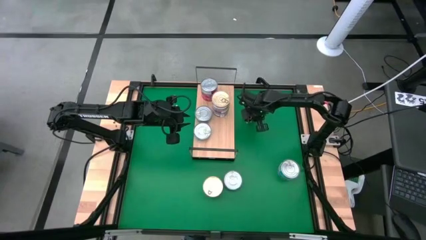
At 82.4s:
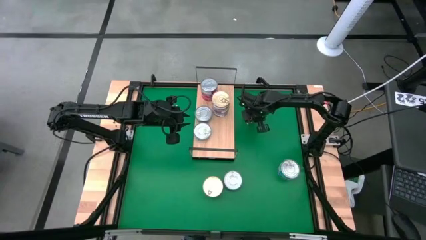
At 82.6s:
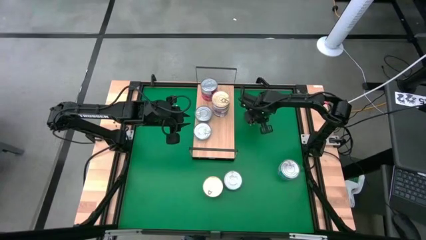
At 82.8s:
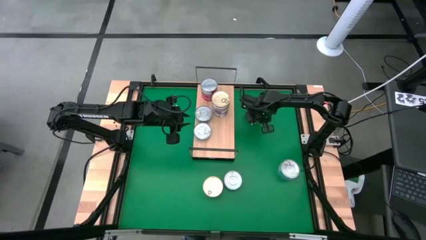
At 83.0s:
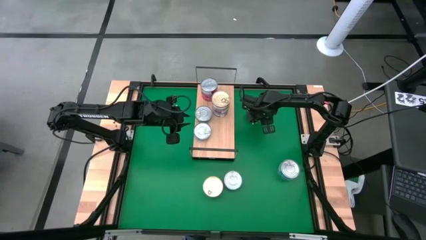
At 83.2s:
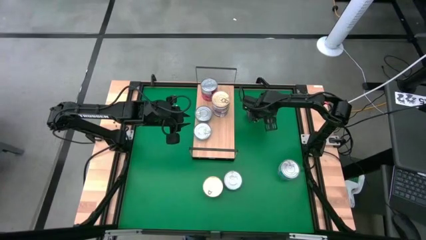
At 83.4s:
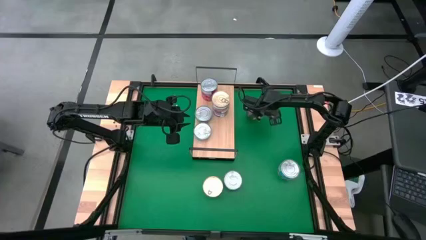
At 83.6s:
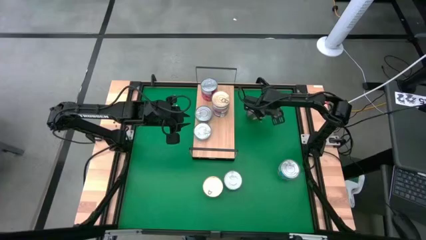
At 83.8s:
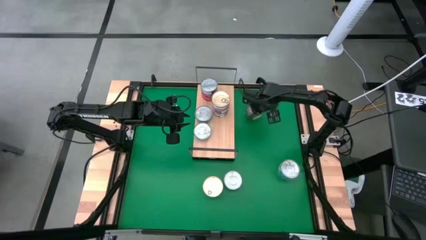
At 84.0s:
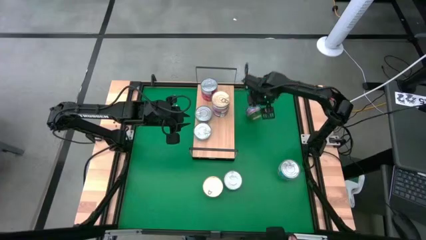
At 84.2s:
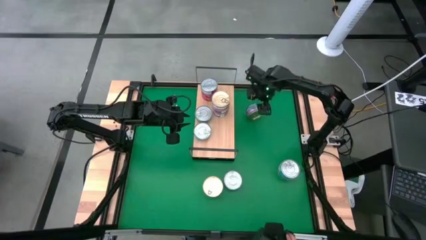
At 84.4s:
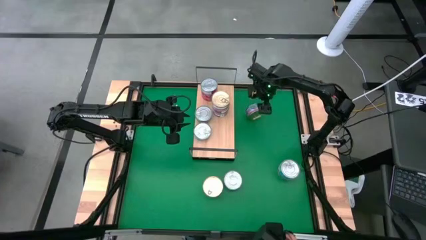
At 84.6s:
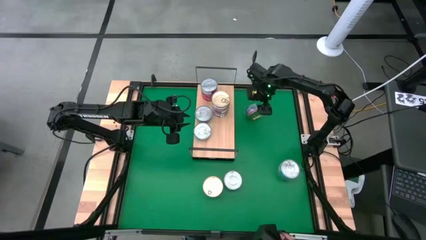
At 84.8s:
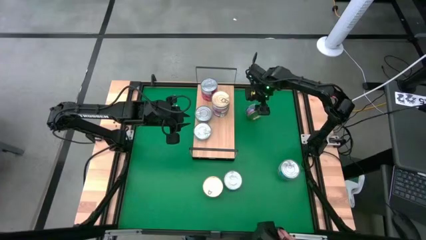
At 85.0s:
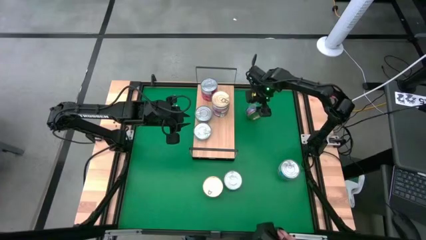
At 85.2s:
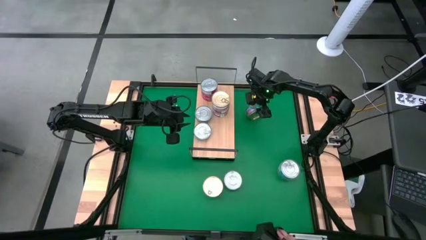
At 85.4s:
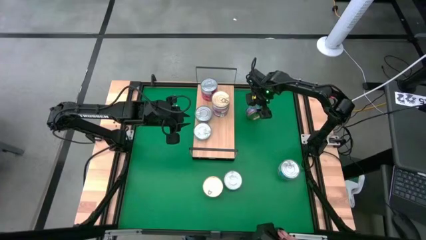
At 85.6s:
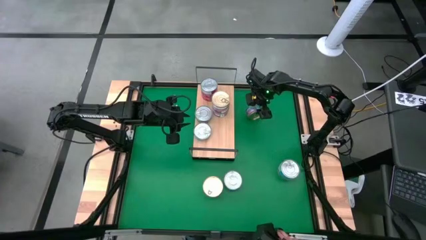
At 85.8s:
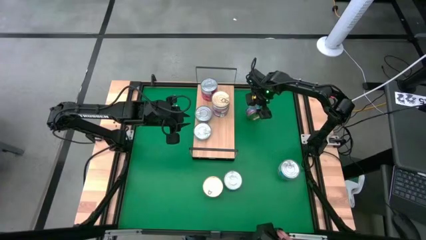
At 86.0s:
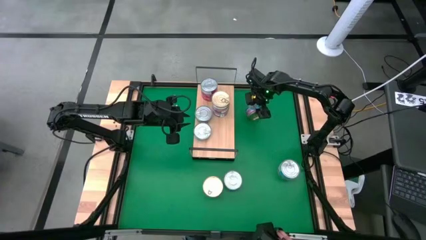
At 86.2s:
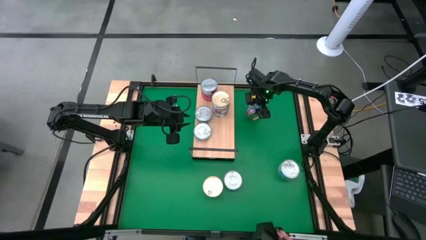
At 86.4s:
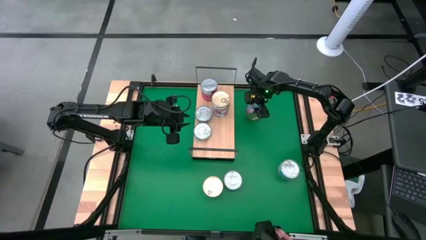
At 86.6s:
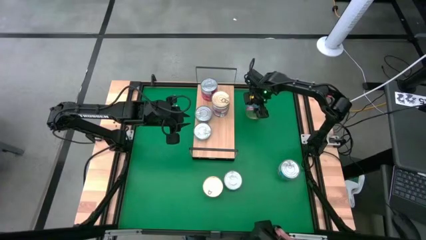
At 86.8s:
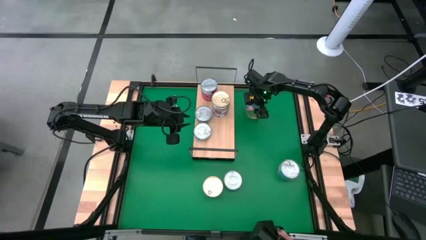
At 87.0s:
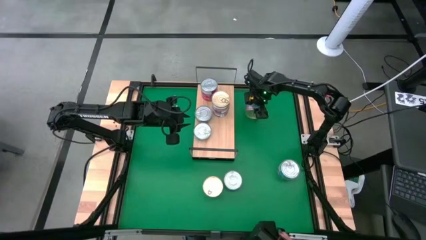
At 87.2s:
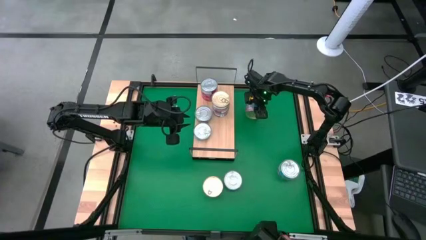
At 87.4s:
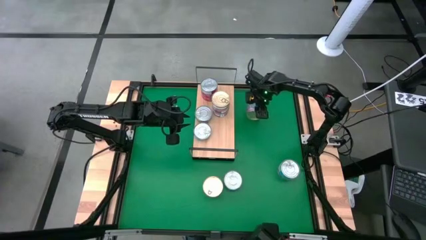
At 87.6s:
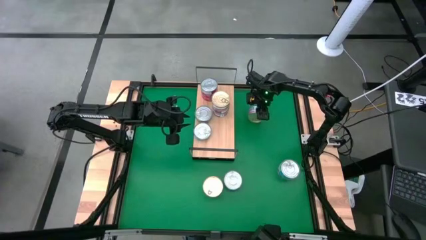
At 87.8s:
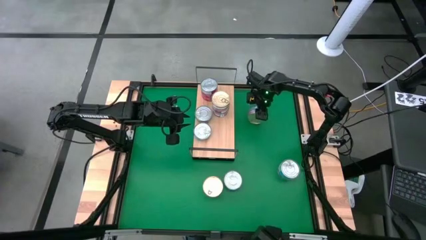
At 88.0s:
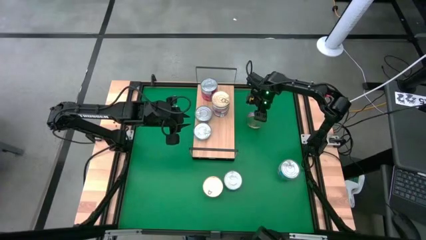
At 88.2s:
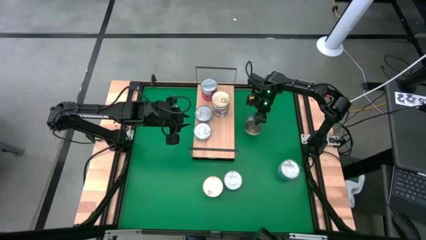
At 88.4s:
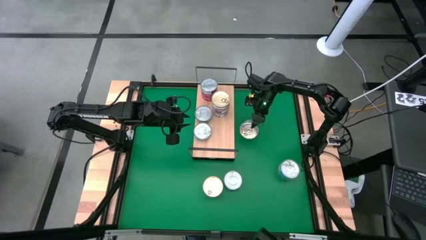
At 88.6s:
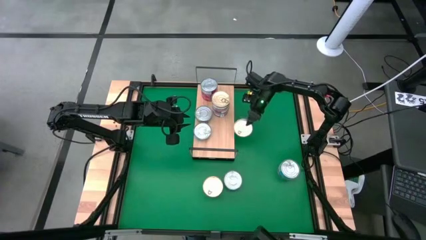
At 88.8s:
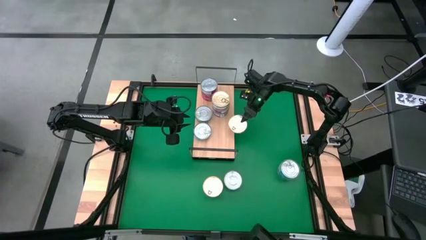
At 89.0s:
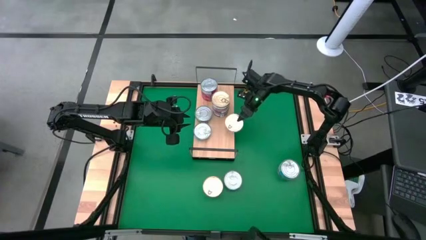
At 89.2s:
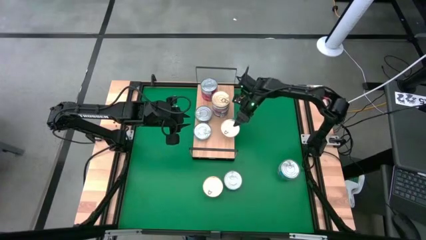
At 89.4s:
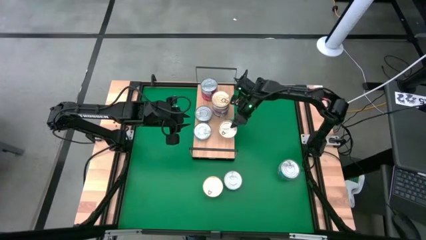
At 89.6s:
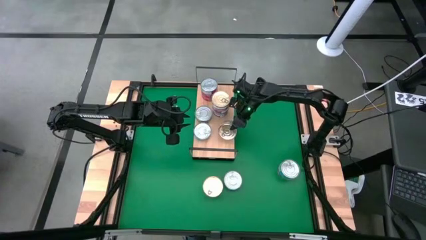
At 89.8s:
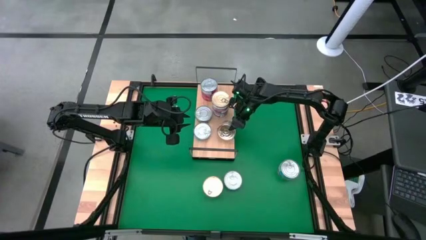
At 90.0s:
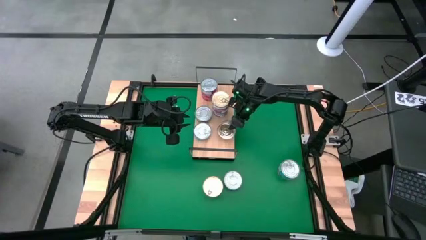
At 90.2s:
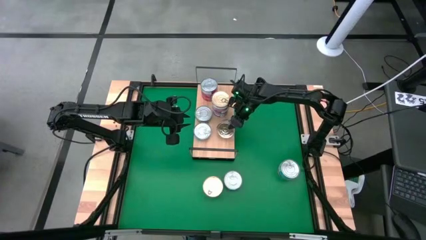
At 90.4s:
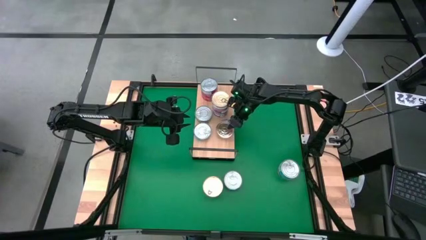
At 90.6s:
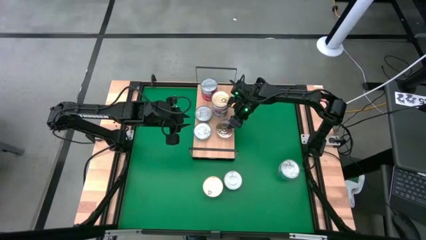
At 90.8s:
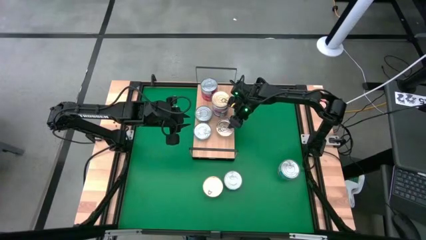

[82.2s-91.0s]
Task: Stack canned seafood by type on shelf
Put the dark blue tuna can on the shelf

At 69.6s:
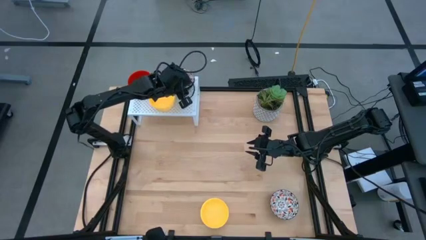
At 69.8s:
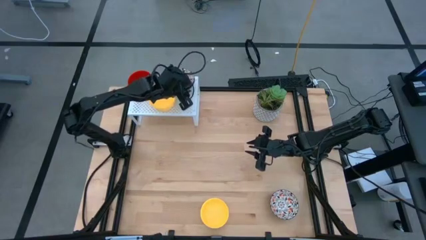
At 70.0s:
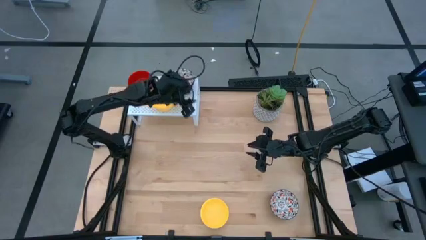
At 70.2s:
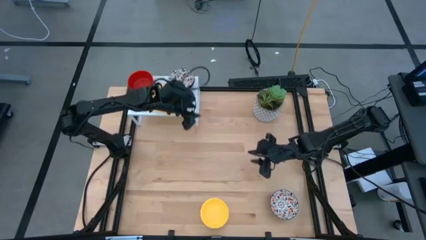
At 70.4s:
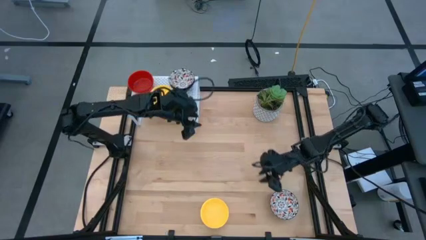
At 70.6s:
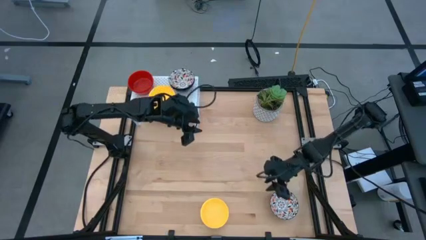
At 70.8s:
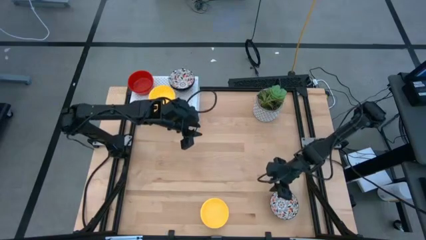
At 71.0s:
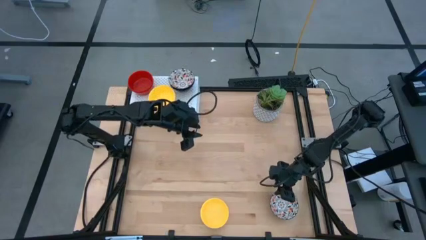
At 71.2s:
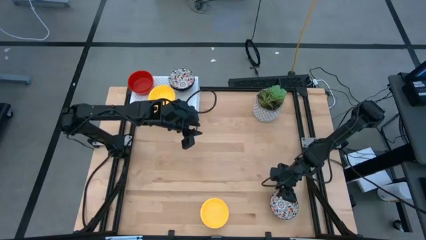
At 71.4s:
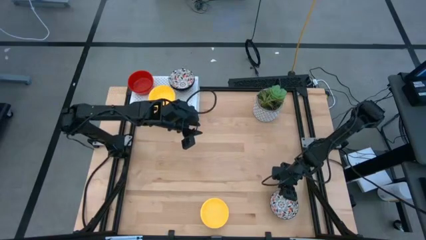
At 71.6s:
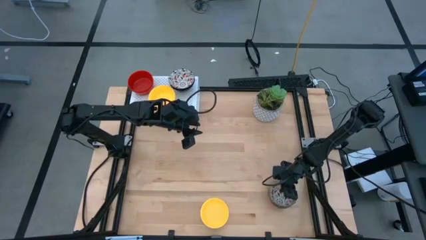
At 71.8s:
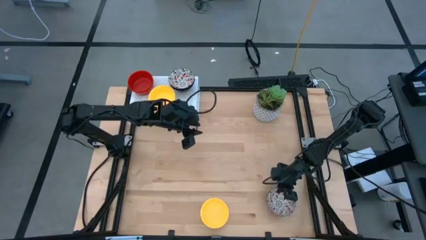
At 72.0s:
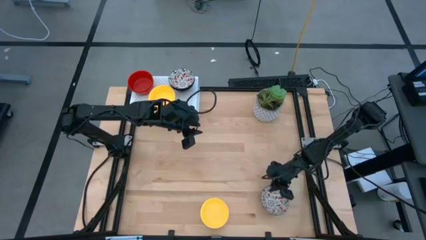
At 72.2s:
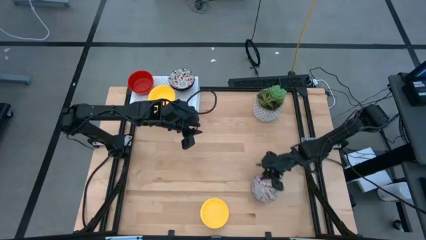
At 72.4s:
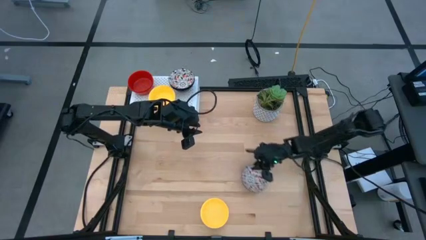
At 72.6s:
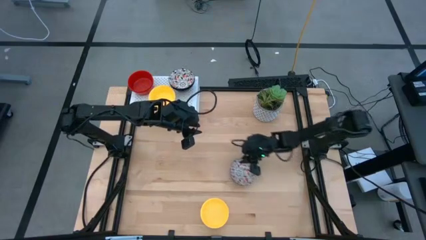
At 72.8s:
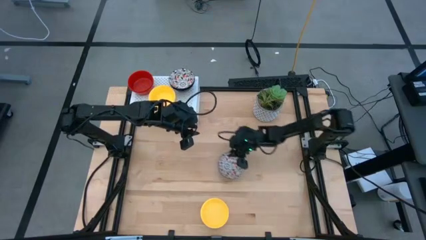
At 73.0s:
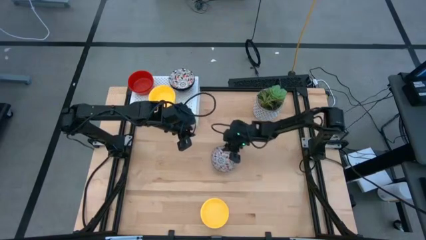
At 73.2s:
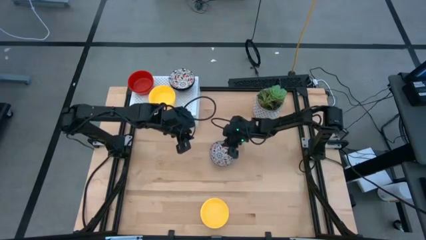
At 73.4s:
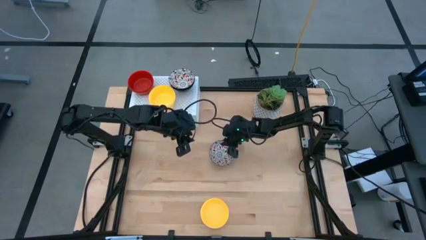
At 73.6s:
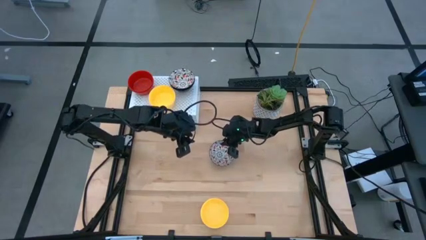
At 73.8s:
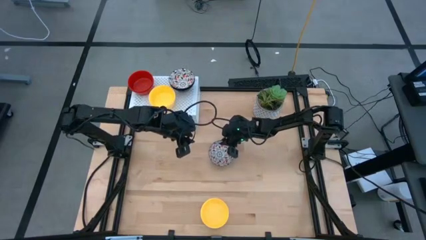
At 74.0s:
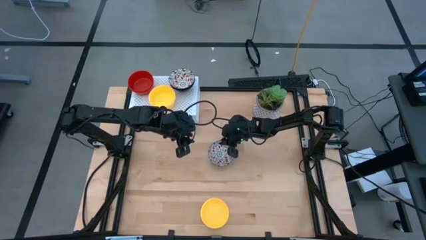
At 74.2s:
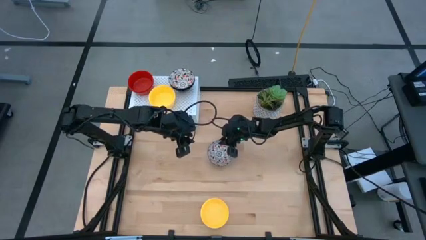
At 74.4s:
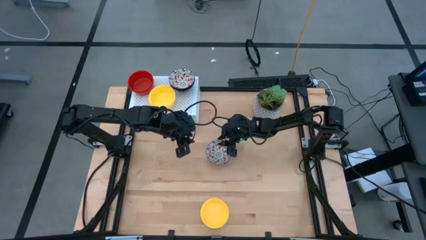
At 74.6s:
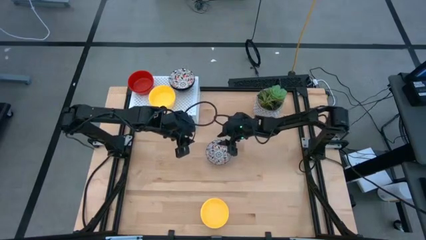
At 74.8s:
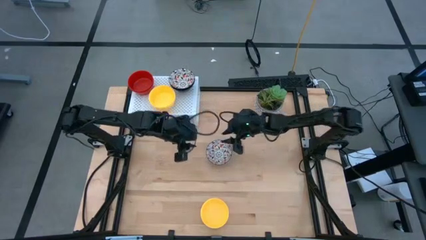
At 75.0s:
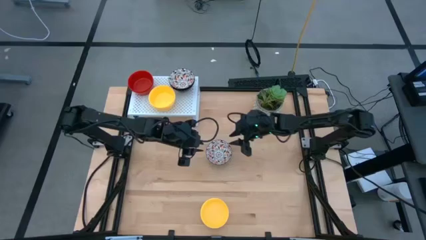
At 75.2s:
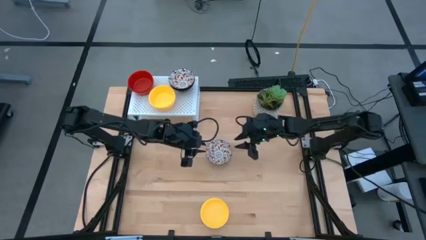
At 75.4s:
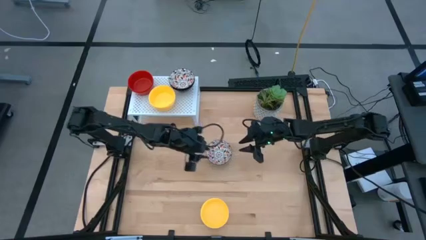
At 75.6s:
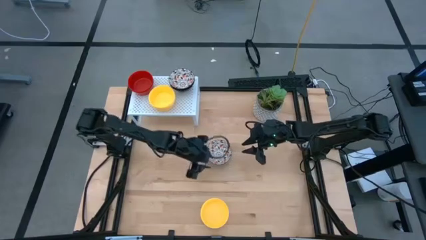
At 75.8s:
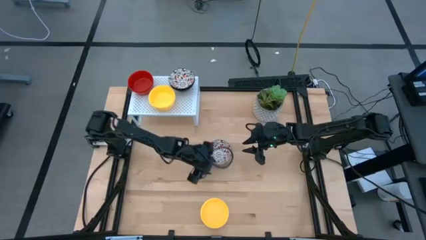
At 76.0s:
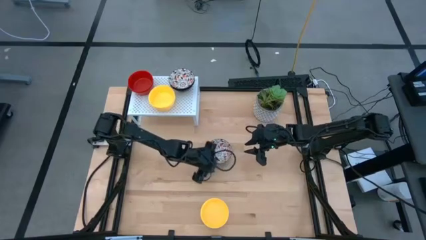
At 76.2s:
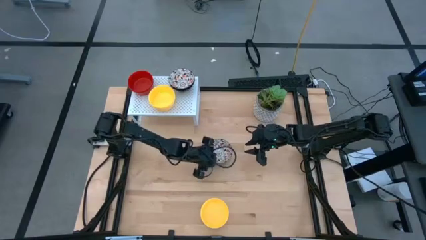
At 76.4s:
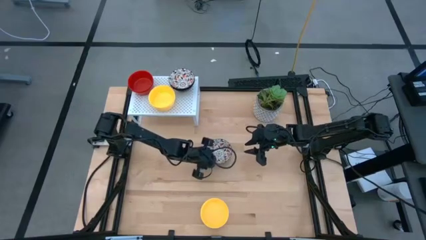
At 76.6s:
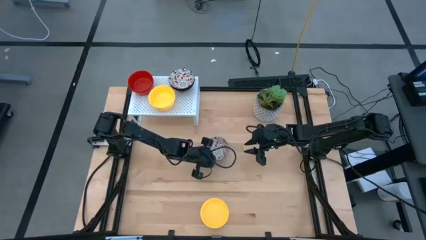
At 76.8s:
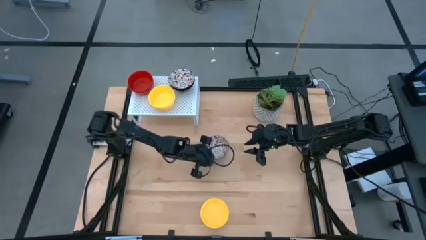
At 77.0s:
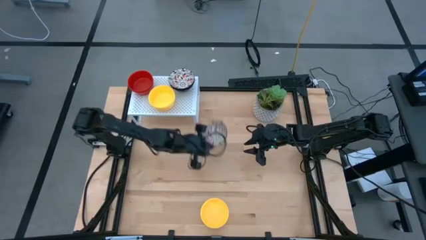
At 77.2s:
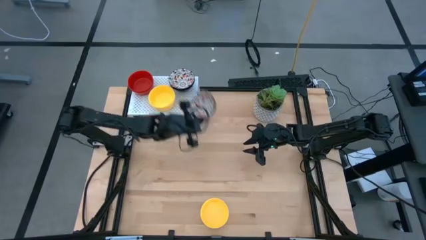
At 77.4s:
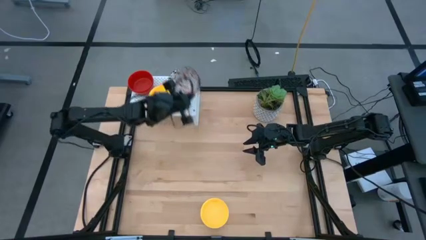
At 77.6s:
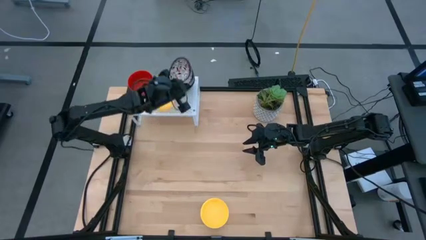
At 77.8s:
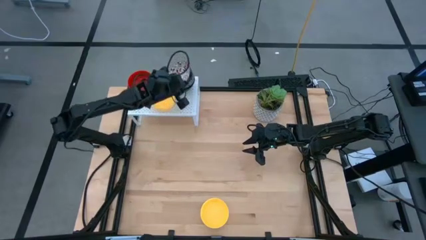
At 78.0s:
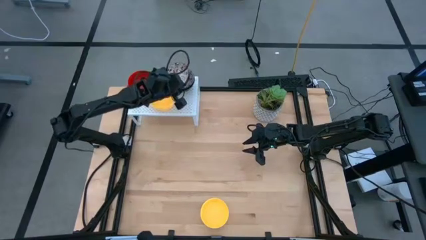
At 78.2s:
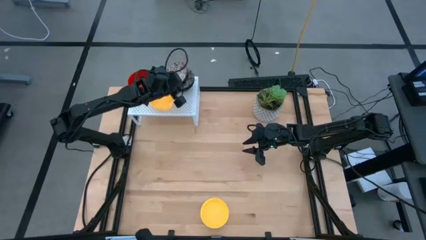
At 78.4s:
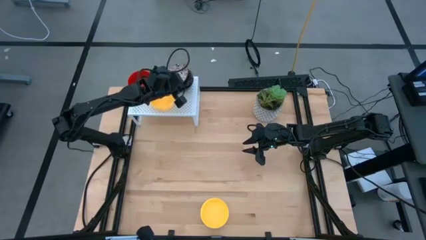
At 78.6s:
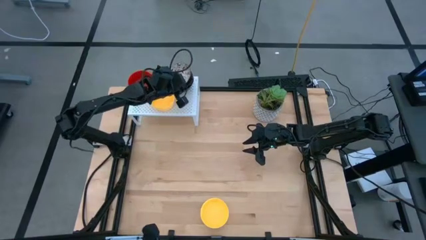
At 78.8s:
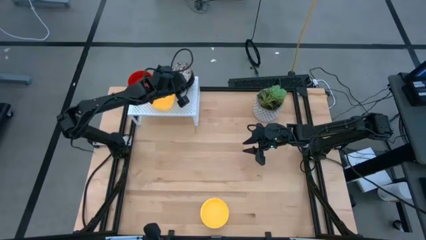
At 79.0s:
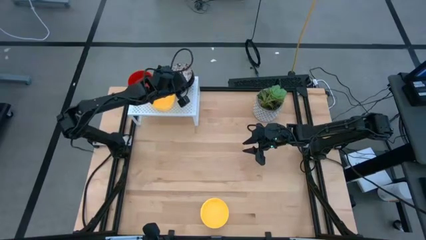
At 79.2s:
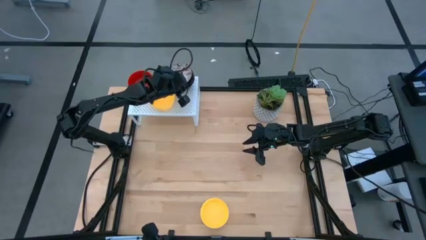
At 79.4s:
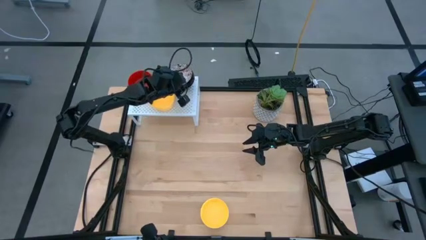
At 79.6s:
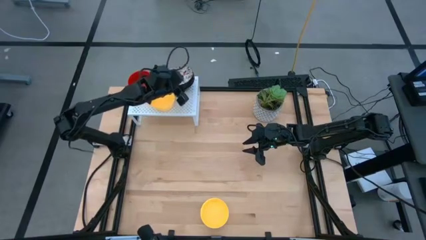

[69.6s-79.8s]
Task: Pick & Place Mini bowls
Stack the white patterned bowl on the white patterned bowl on the shelf
